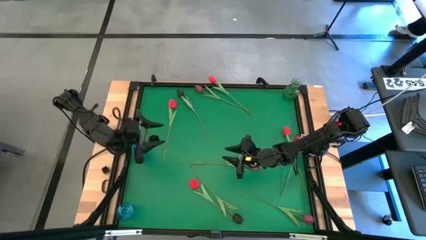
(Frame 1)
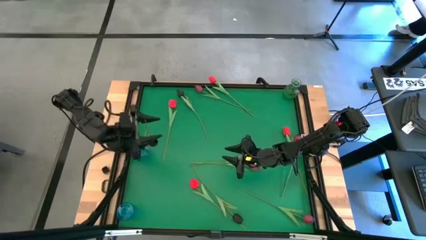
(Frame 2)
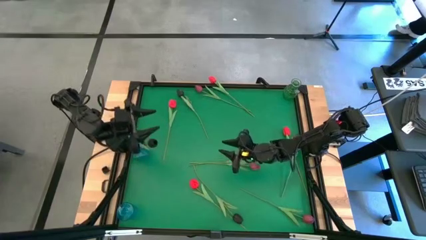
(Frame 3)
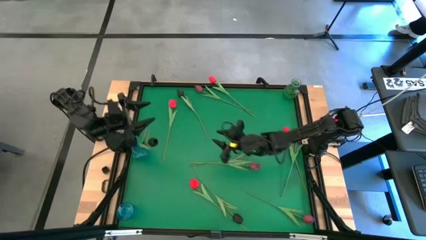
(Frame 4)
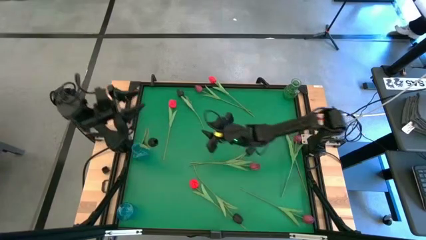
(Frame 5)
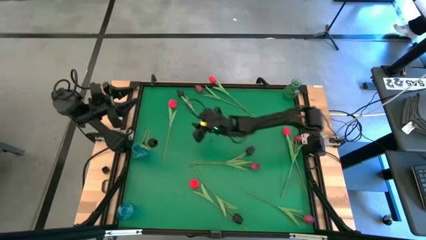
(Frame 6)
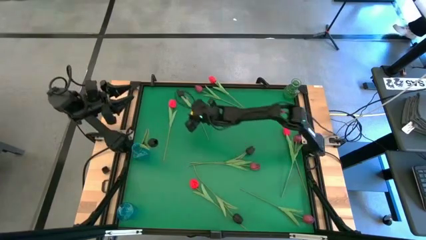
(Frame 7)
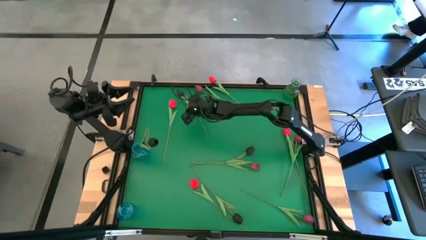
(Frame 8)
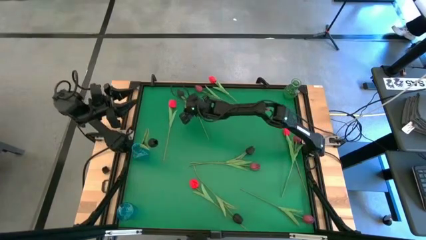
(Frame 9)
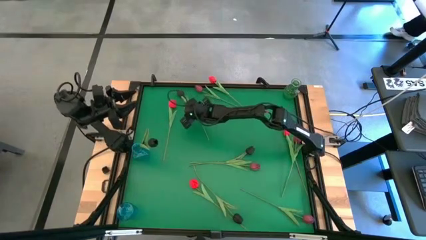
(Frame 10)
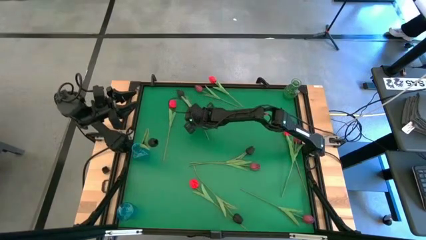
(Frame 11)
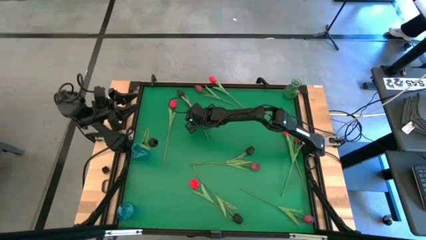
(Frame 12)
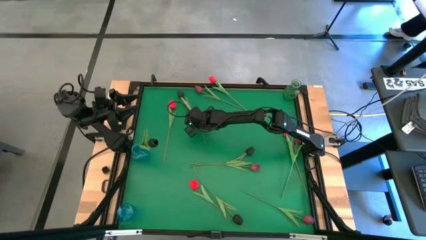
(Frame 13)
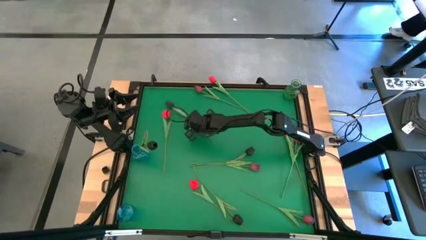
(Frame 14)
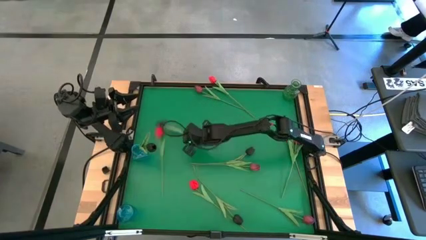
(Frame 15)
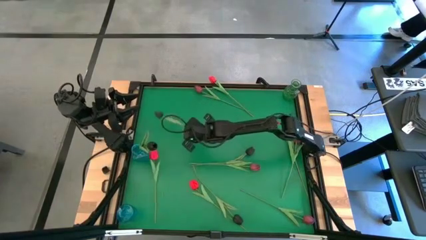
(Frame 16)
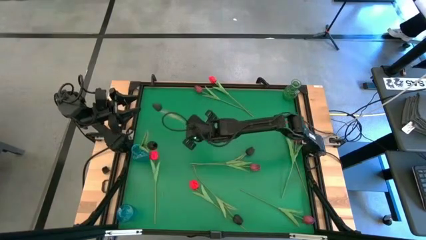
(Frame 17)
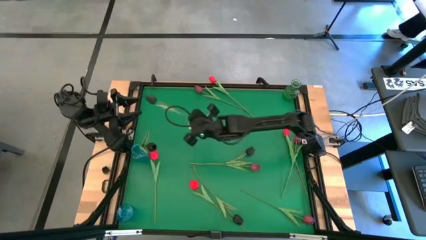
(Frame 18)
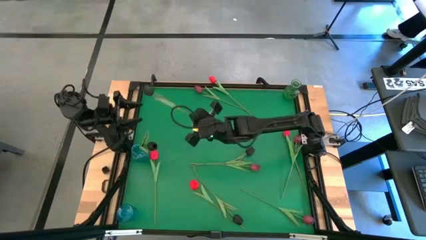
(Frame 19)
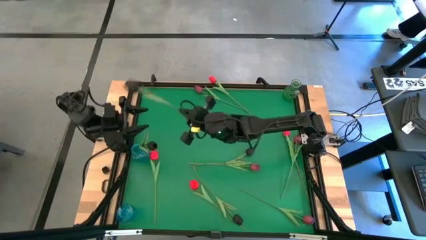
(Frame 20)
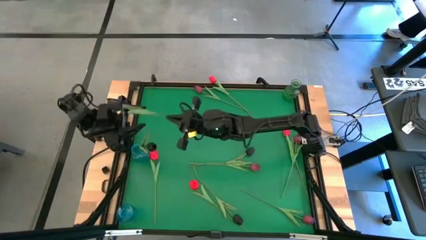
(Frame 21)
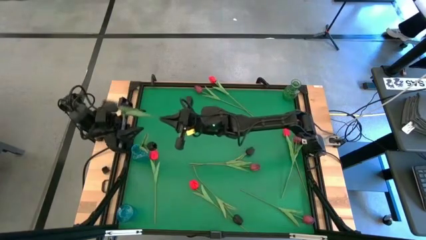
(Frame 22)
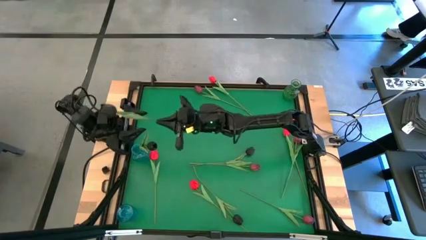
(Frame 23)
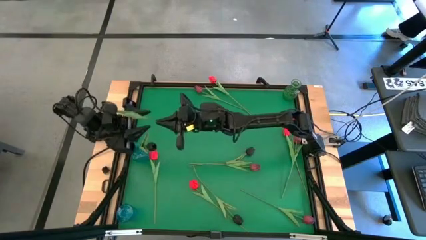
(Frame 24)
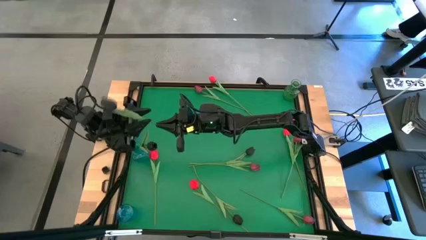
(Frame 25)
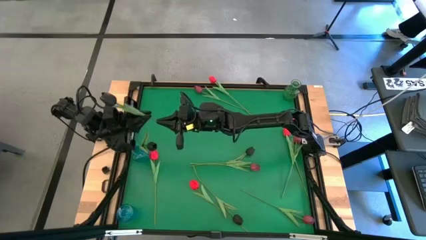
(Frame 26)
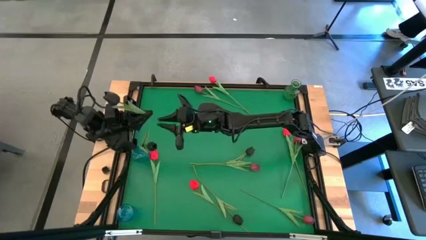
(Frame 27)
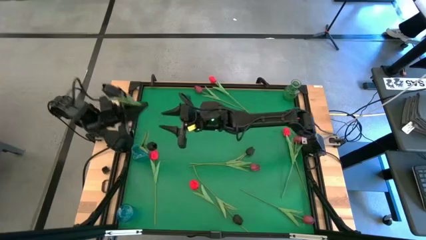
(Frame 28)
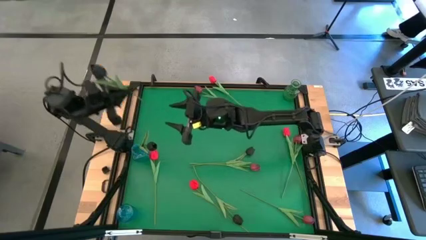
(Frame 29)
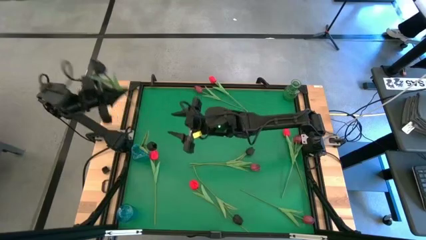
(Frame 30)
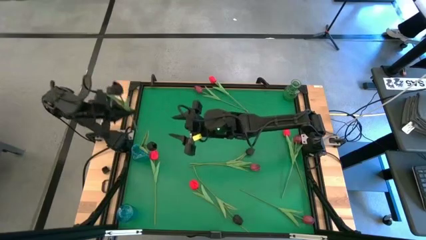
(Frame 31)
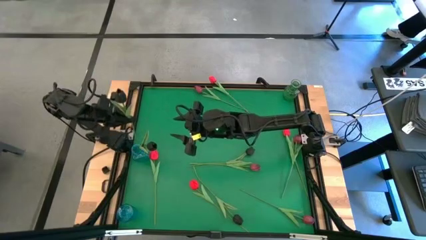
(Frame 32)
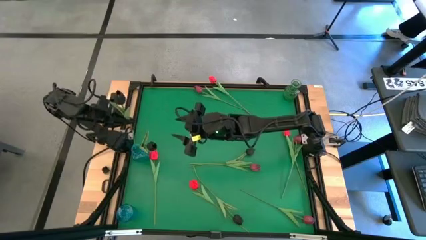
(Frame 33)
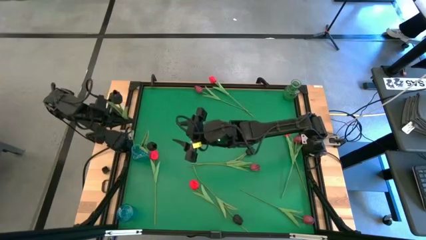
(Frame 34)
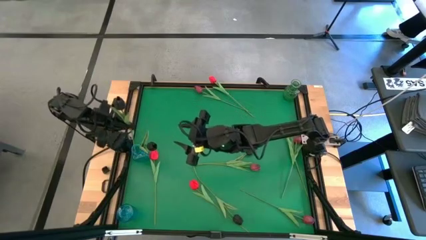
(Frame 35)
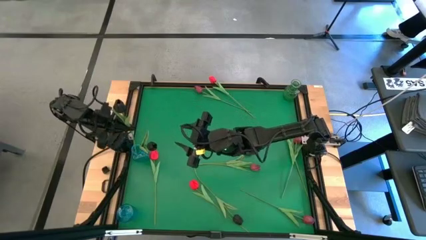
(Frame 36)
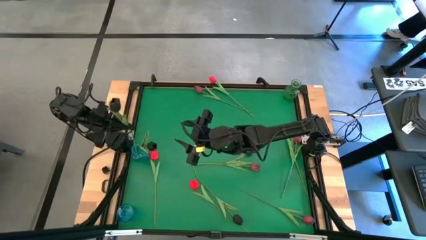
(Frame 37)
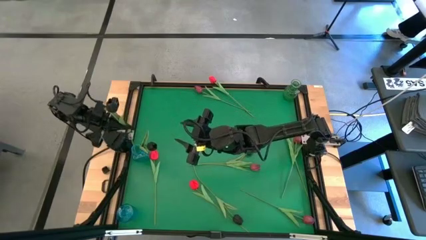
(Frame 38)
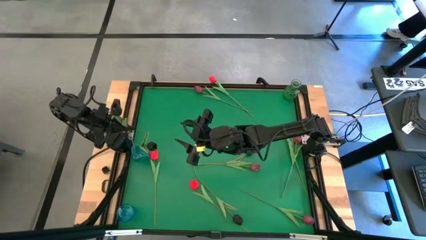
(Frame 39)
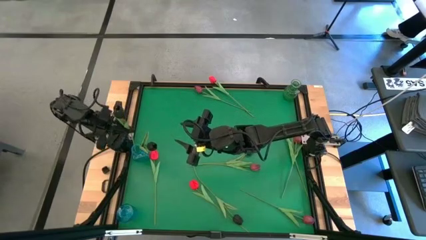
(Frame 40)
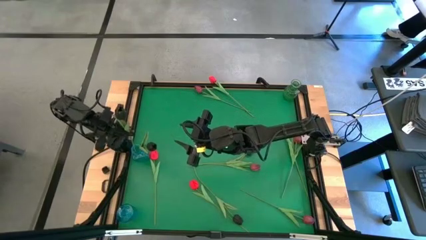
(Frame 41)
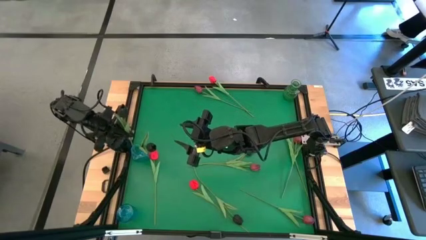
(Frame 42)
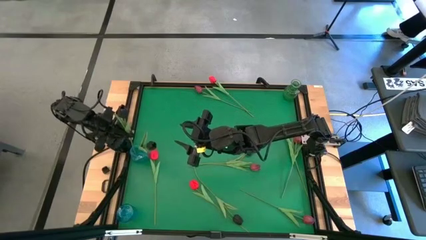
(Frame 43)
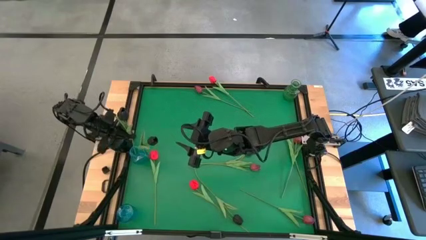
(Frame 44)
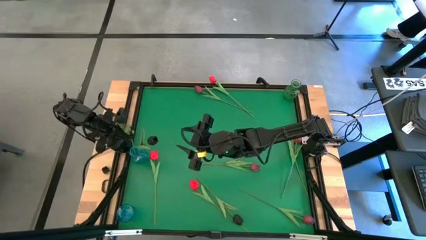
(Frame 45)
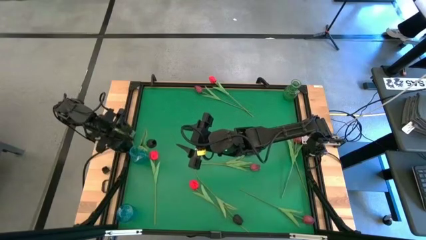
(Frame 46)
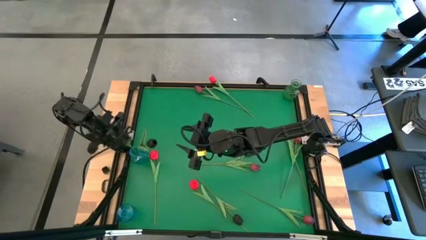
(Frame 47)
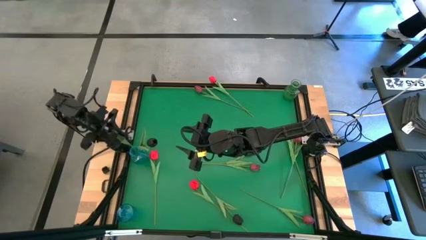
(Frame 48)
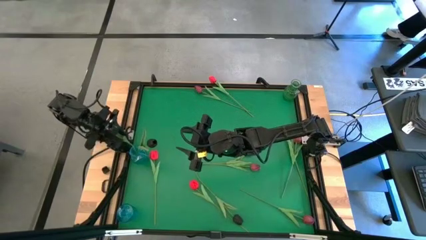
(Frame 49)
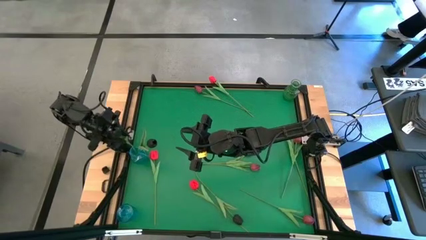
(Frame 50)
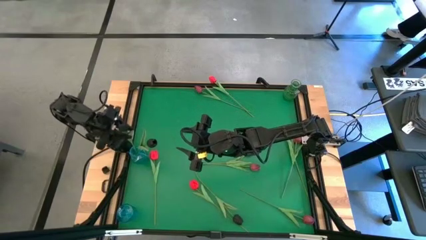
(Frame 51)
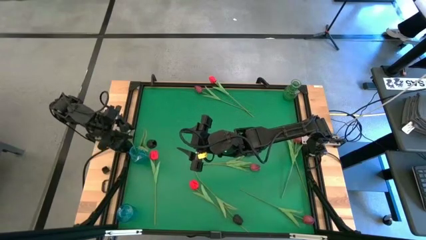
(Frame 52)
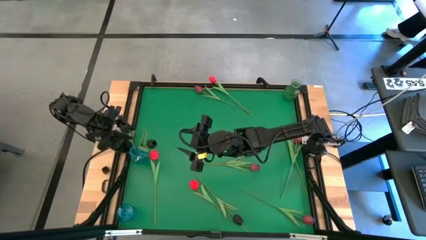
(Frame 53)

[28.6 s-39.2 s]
Task: Sort flowers into vase by color
Put the black tulip into the the top blue vase

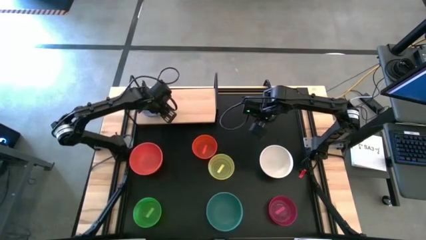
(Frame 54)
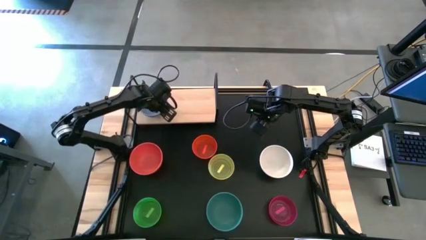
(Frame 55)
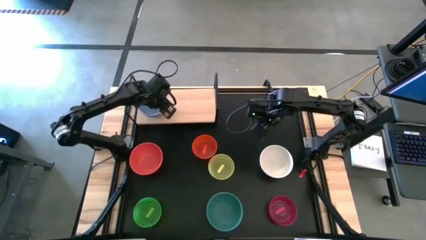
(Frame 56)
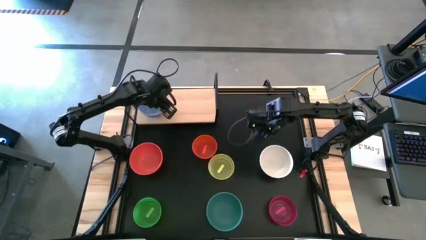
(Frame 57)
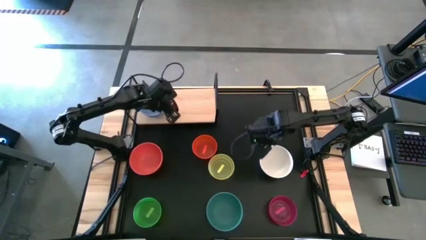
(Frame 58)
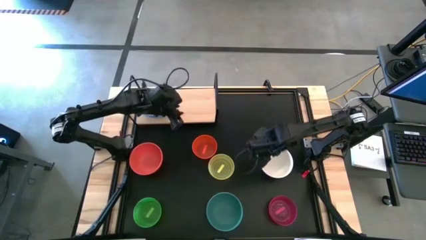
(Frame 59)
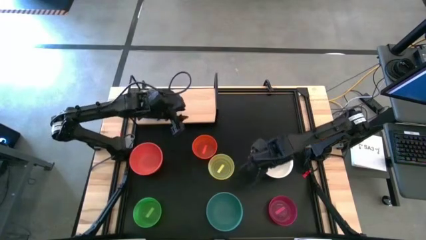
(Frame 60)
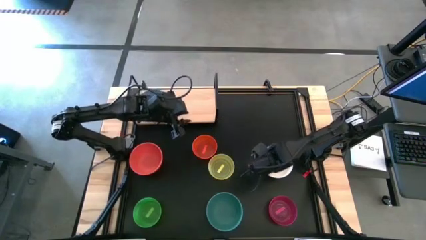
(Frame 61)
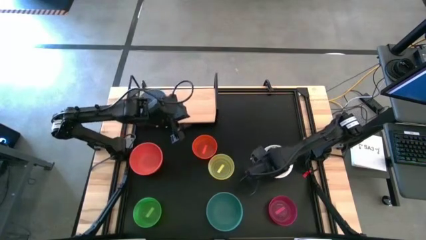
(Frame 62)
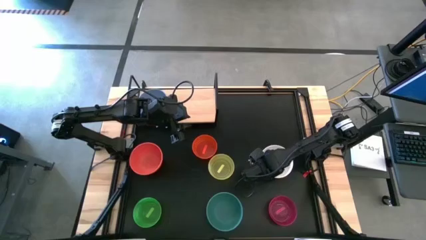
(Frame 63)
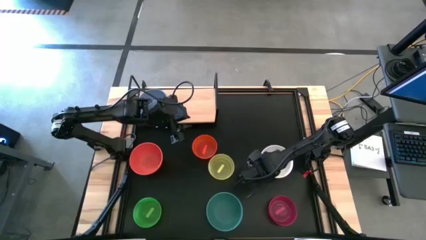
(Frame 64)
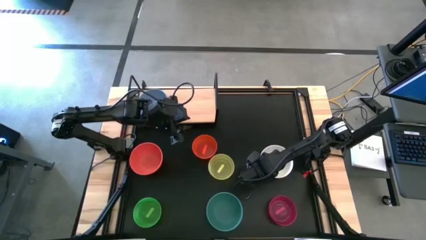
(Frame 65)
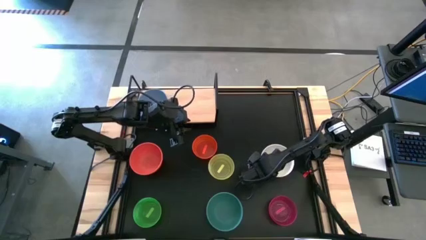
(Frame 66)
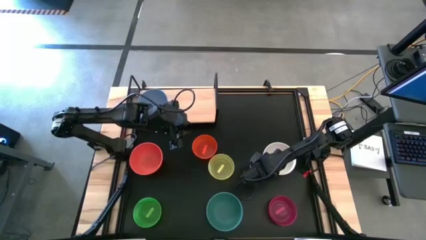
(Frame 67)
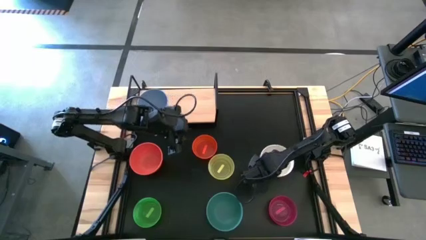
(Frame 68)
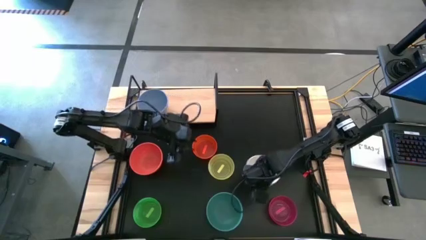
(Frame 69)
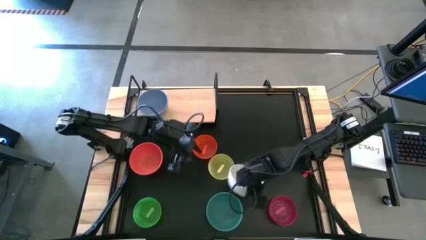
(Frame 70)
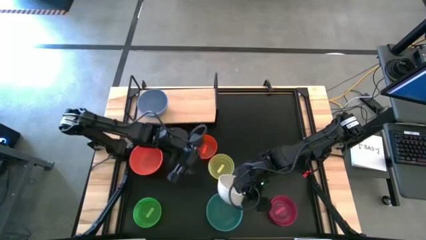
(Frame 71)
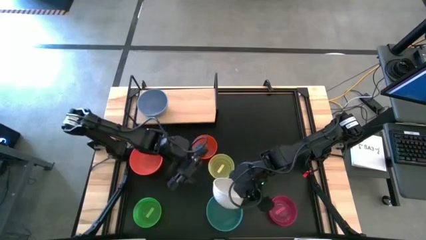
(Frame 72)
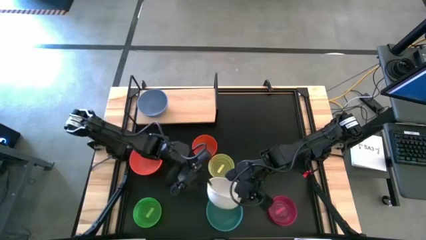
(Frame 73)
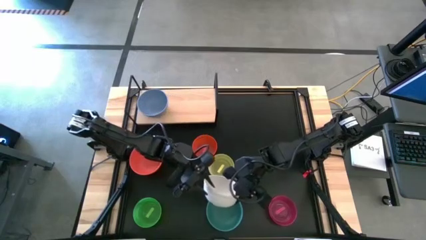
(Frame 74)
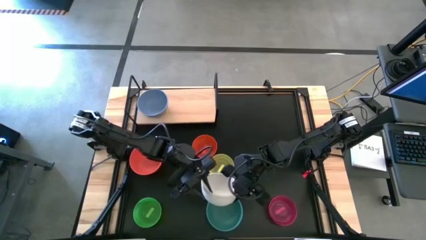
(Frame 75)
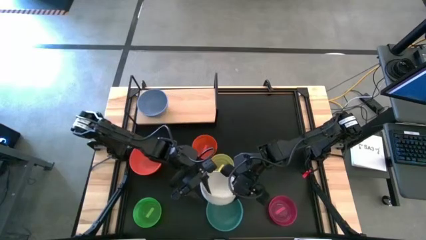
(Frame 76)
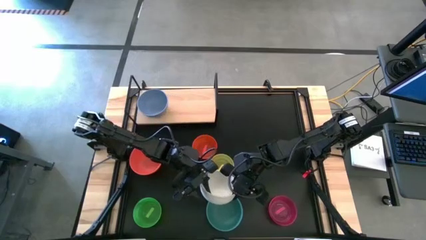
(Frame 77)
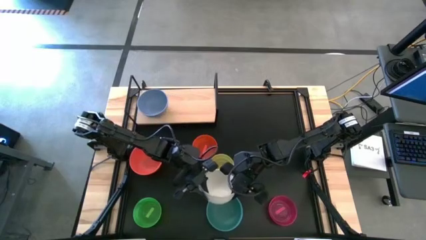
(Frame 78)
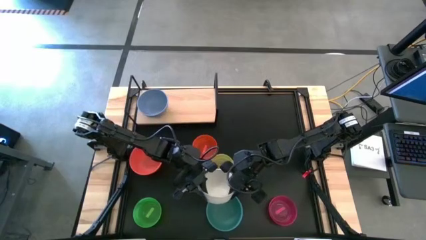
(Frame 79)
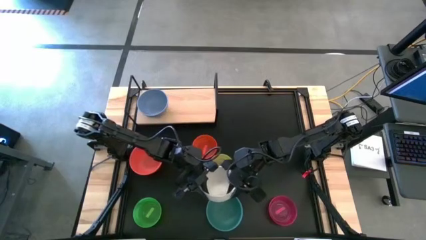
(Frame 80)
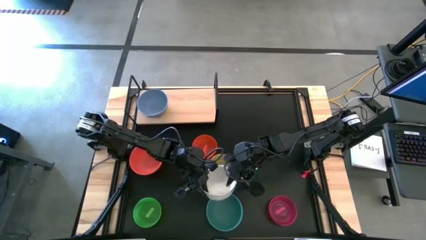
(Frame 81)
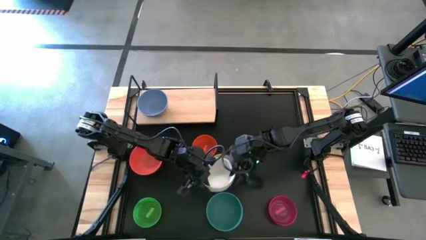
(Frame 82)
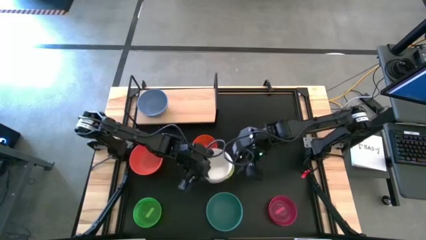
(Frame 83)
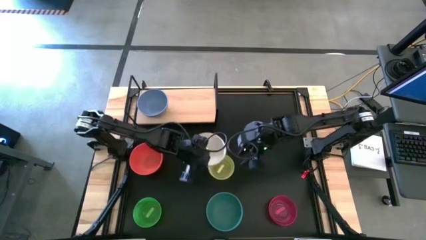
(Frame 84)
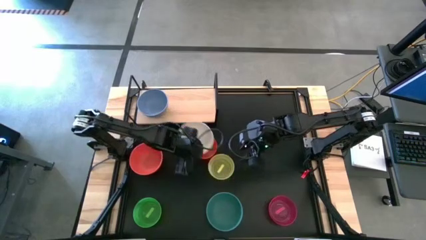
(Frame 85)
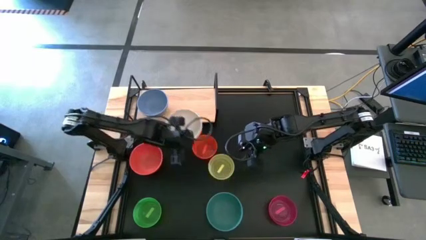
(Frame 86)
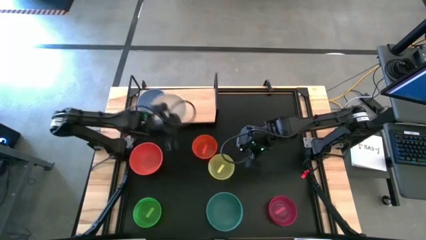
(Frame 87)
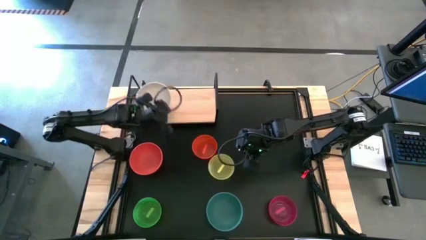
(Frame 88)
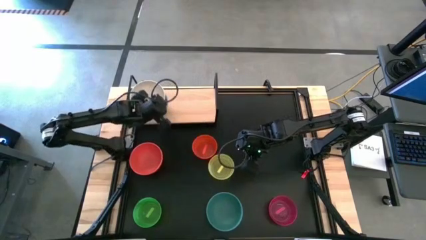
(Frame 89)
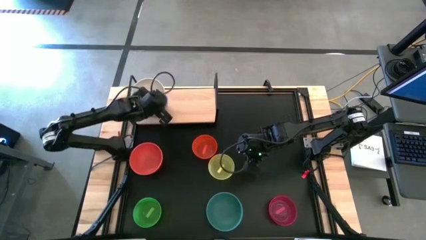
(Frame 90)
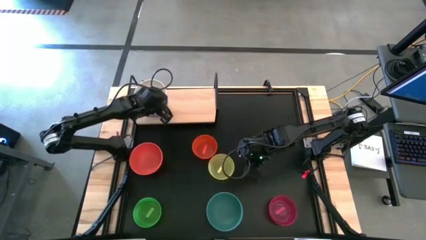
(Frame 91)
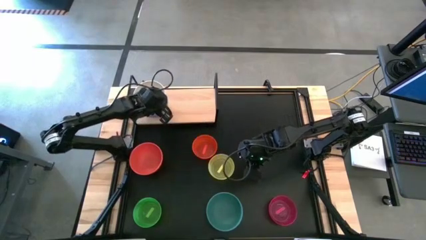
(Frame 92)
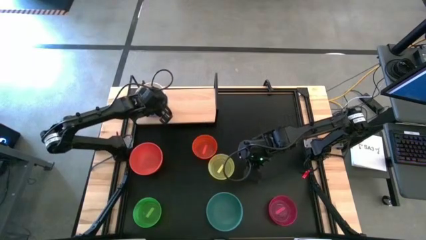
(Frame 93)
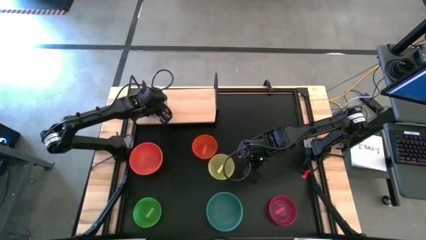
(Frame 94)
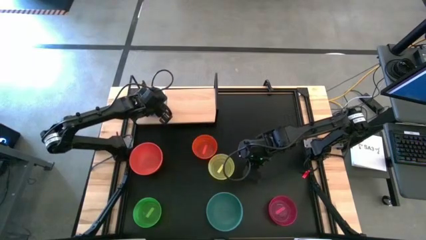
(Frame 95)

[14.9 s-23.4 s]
Task: Place and stack bowls onto a shelf
Stack the white bowl on top of the blue bowl on the shelf
